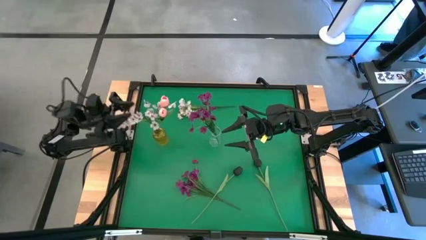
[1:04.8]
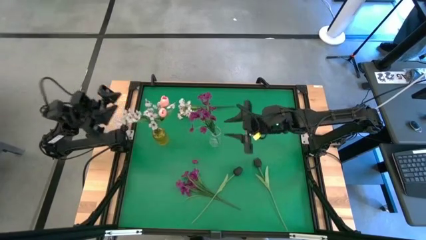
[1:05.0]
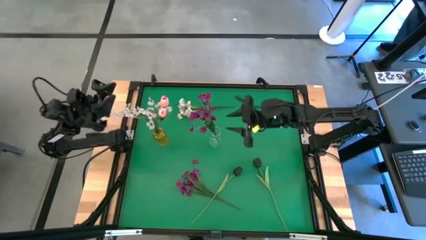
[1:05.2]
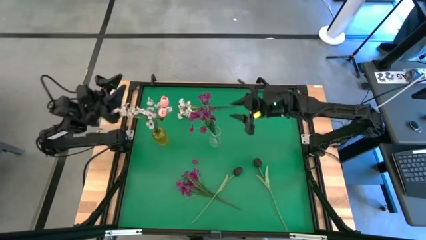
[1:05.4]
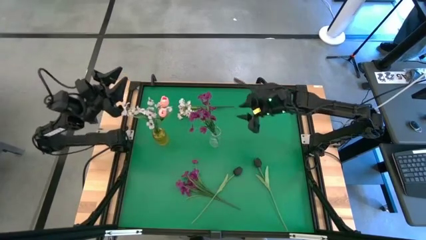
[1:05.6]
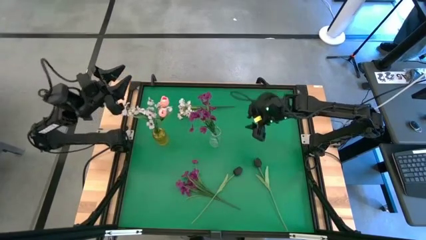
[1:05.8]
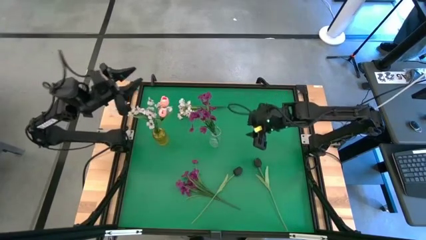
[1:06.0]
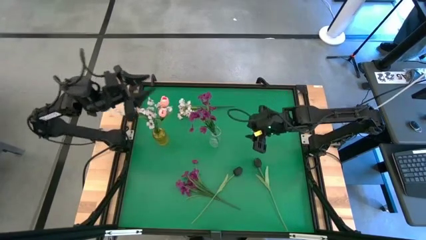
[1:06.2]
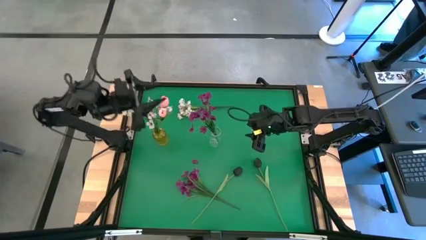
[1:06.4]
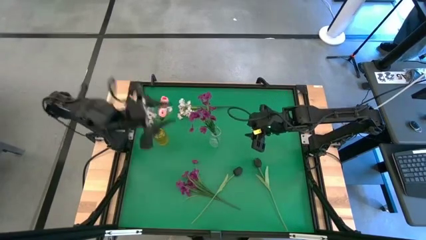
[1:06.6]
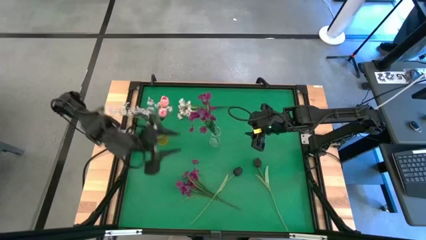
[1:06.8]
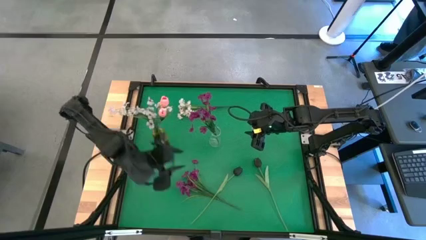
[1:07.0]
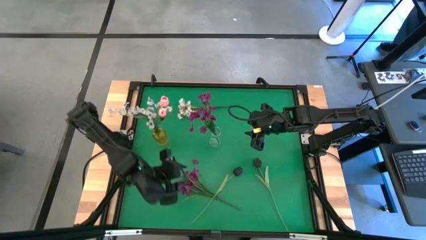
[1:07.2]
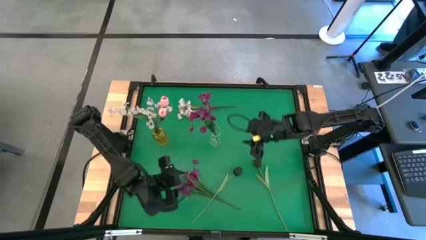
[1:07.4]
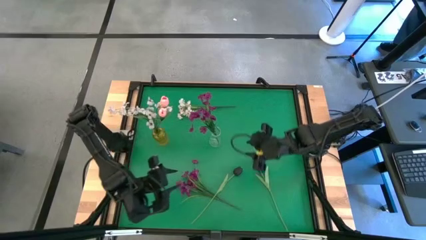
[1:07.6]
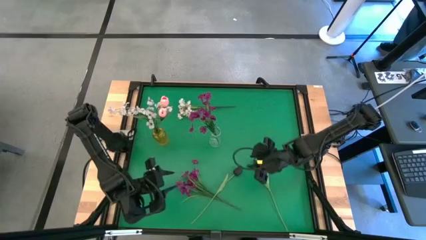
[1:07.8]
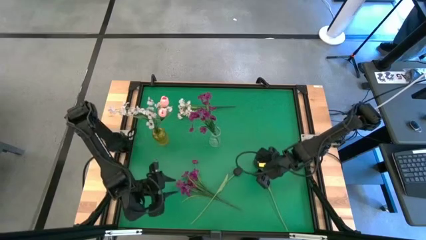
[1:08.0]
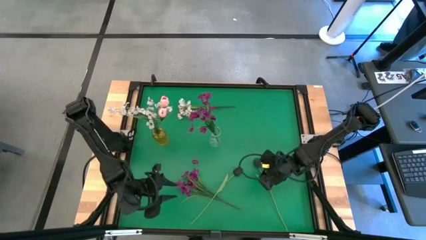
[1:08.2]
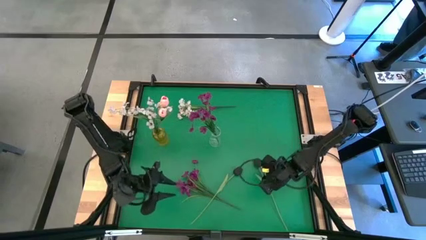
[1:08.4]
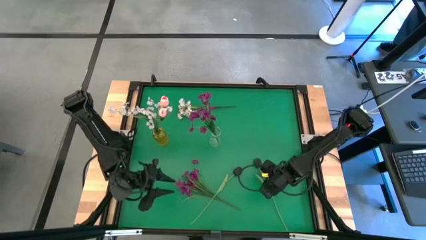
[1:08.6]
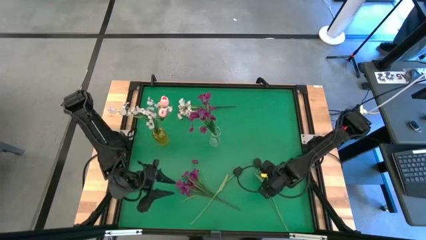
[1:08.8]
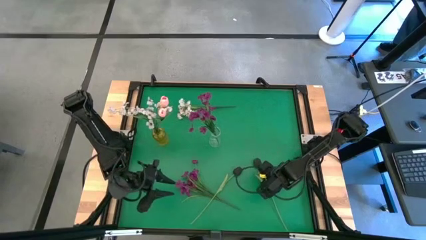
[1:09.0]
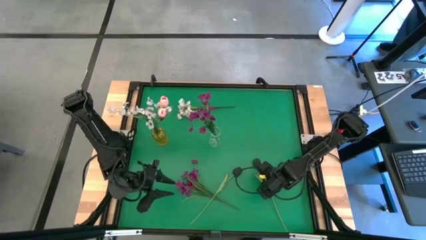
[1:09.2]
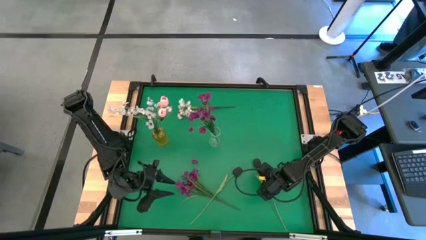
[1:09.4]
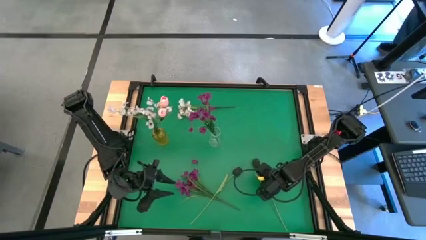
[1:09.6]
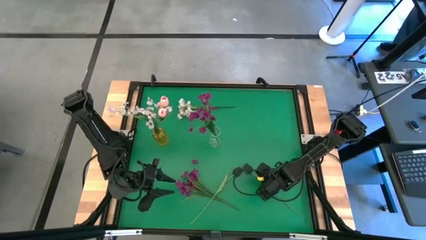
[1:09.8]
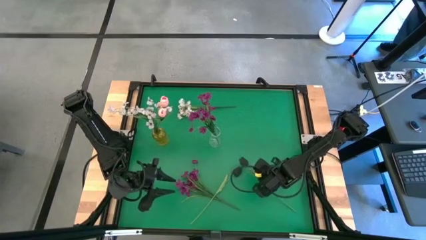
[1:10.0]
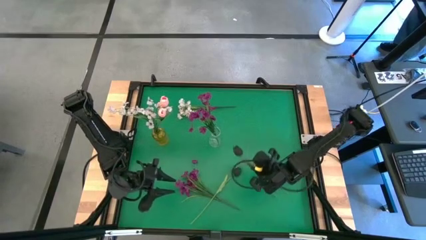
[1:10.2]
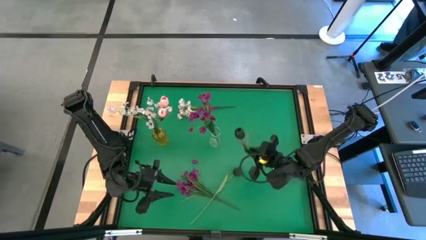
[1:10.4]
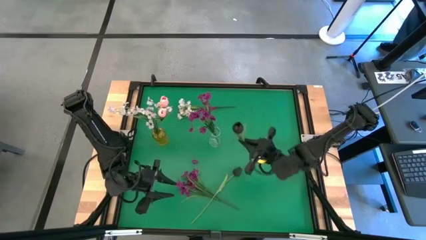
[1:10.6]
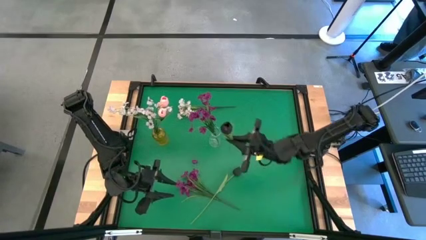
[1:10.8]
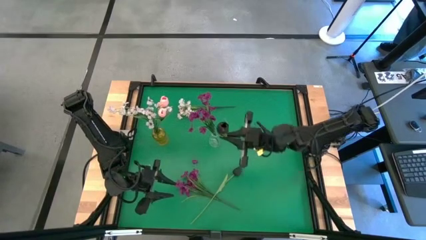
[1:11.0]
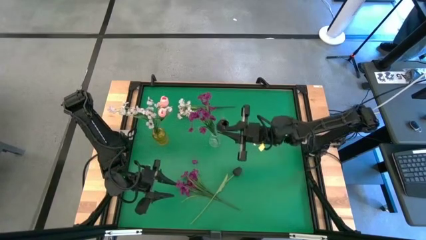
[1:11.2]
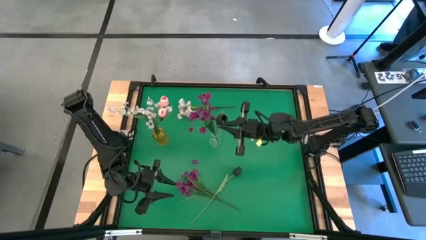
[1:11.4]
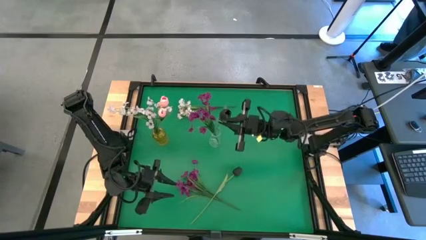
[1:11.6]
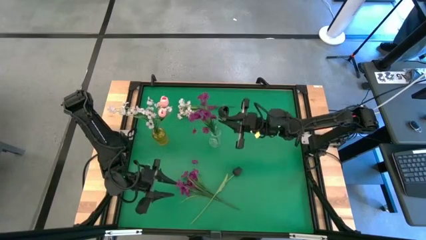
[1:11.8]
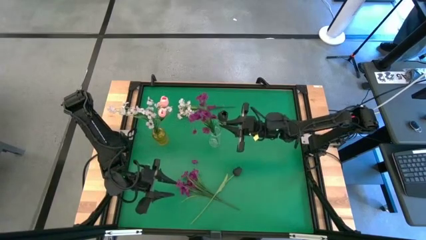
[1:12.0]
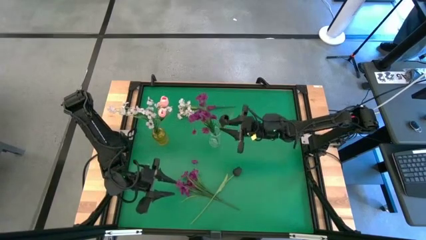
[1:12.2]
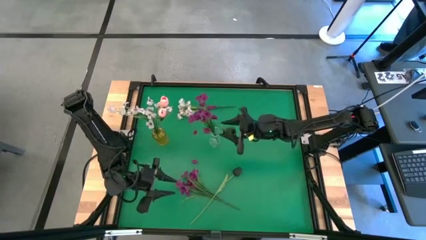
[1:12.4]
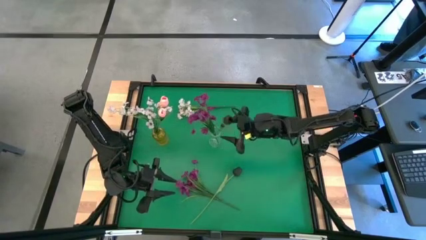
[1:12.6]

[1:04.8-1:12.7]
Task: Sort flowers into vase by color
Put the right black flower into the transparent vase

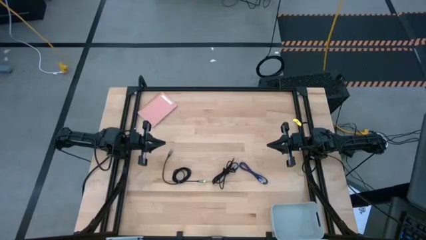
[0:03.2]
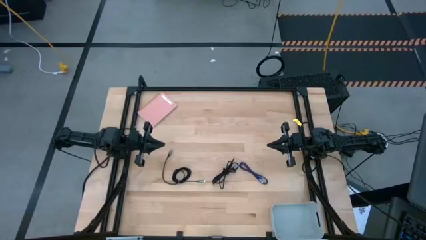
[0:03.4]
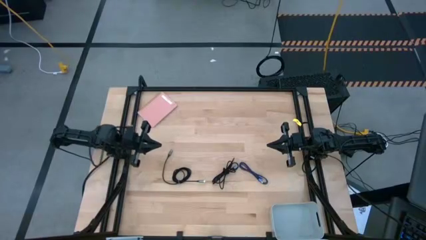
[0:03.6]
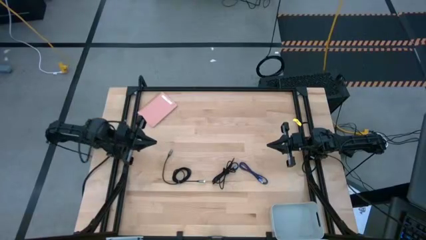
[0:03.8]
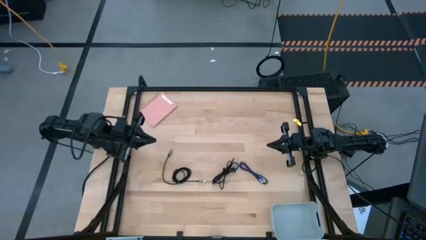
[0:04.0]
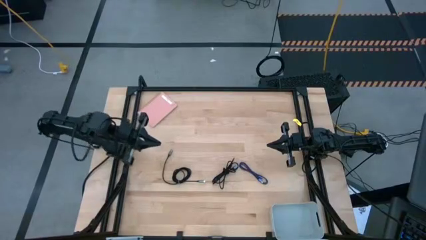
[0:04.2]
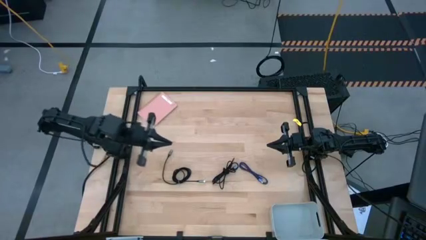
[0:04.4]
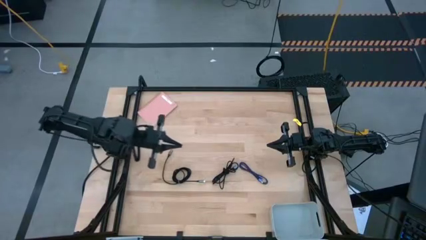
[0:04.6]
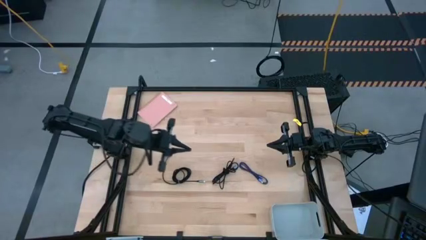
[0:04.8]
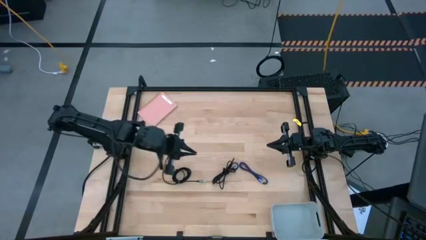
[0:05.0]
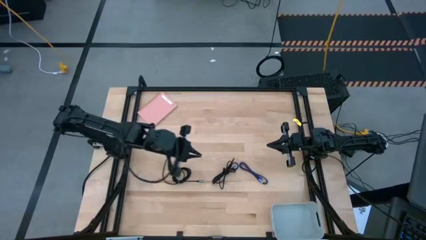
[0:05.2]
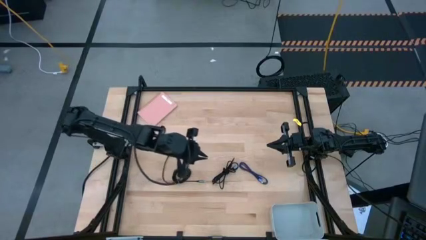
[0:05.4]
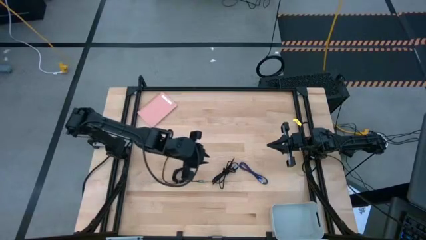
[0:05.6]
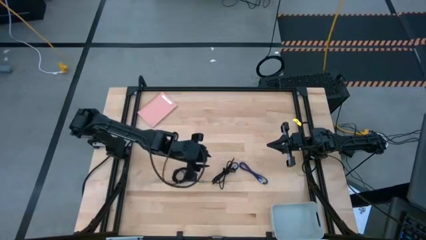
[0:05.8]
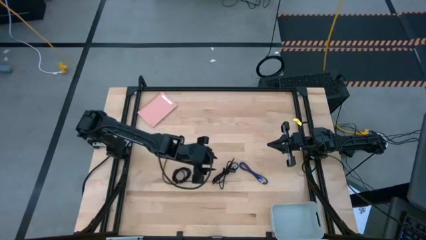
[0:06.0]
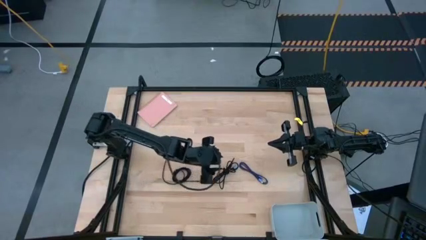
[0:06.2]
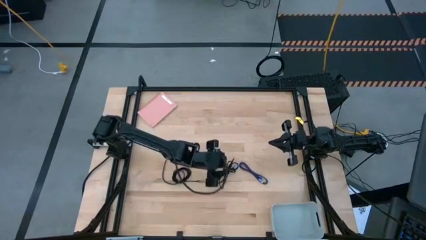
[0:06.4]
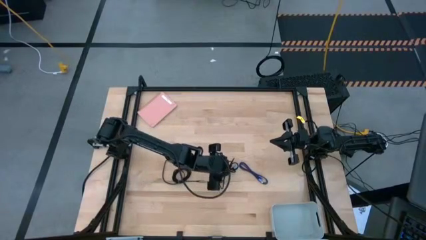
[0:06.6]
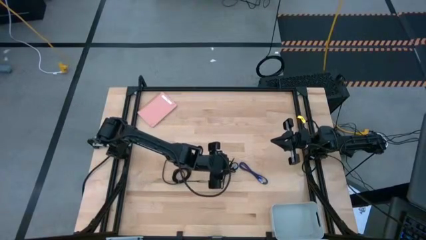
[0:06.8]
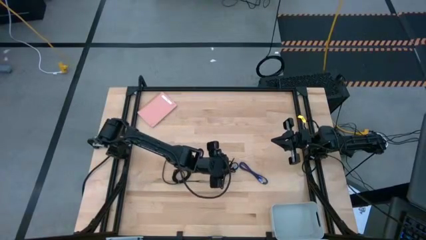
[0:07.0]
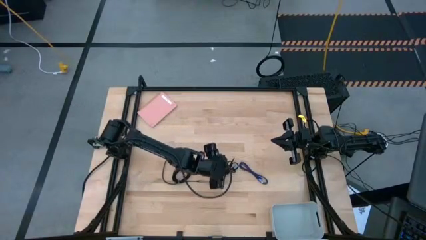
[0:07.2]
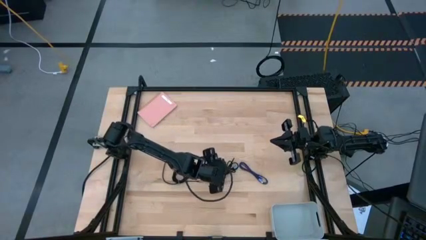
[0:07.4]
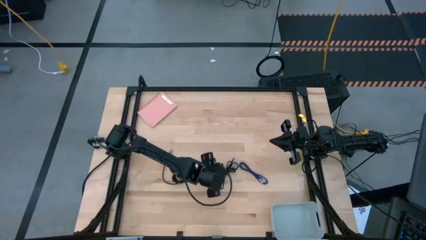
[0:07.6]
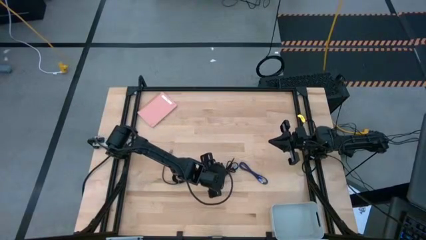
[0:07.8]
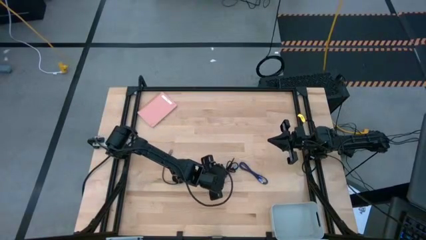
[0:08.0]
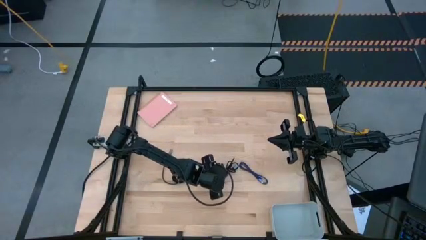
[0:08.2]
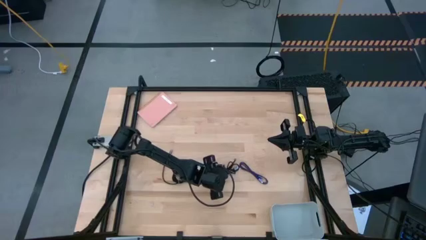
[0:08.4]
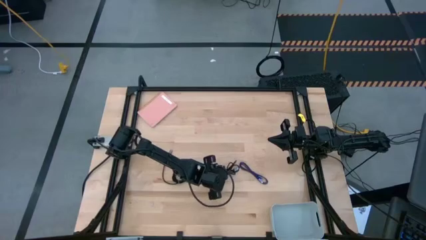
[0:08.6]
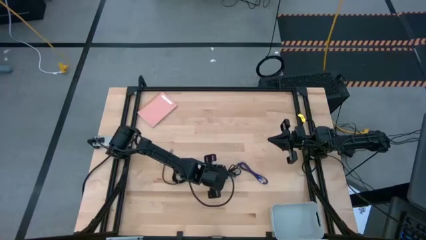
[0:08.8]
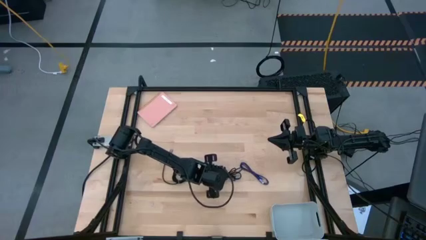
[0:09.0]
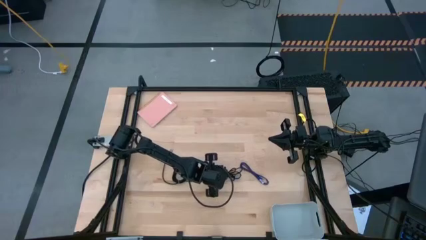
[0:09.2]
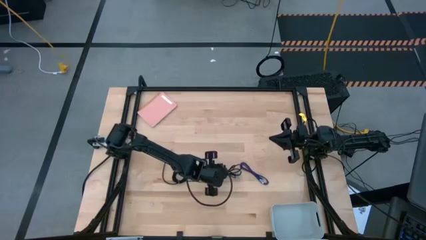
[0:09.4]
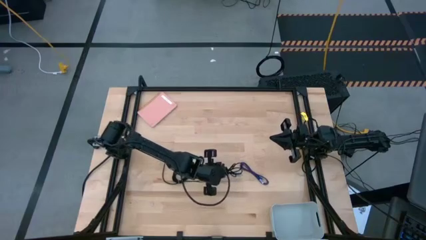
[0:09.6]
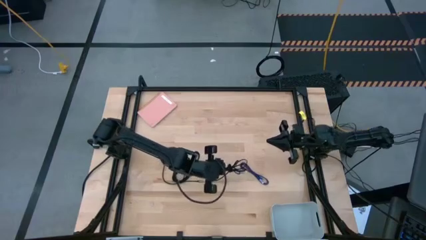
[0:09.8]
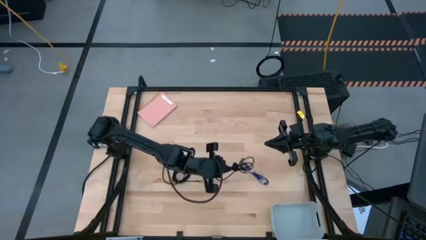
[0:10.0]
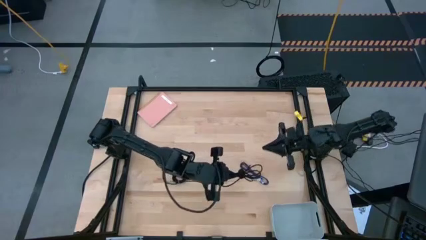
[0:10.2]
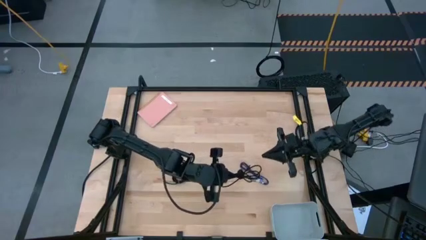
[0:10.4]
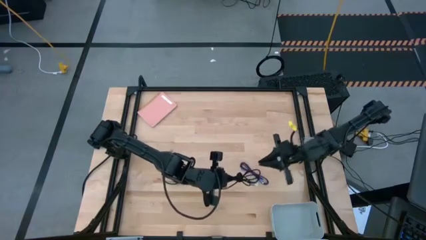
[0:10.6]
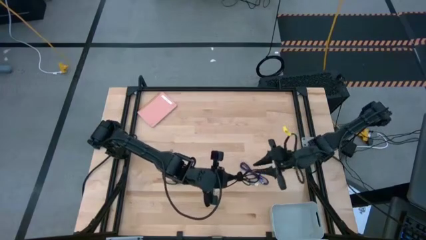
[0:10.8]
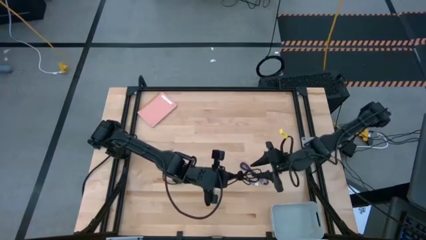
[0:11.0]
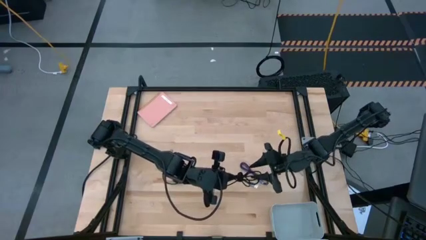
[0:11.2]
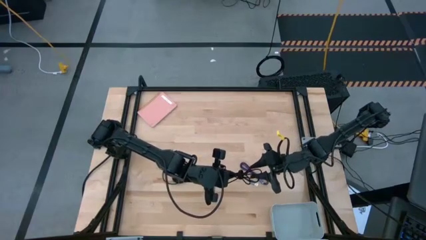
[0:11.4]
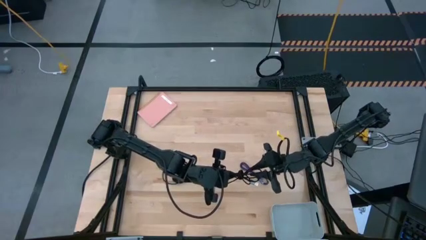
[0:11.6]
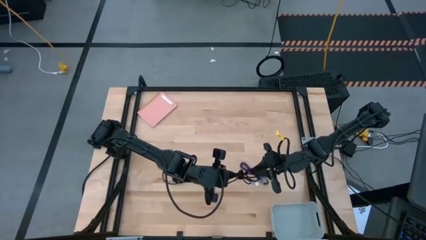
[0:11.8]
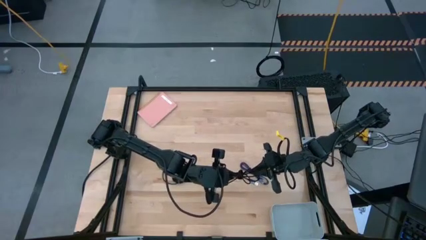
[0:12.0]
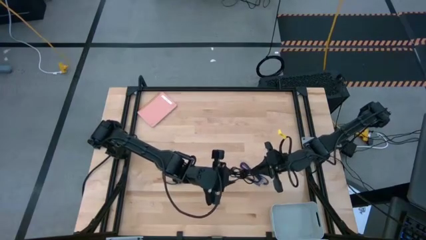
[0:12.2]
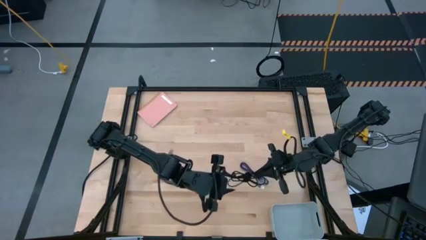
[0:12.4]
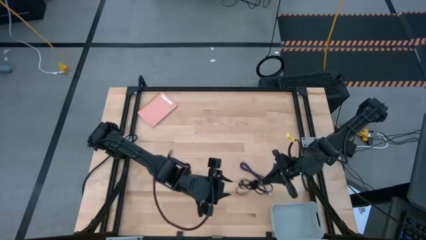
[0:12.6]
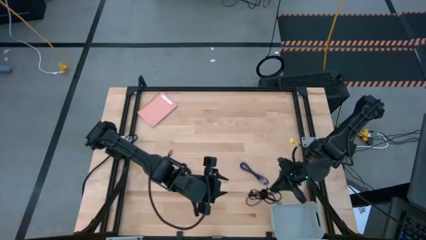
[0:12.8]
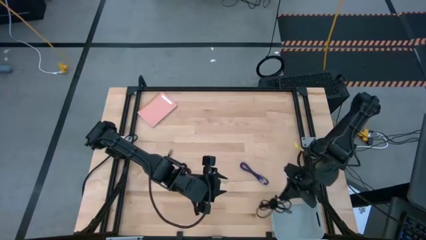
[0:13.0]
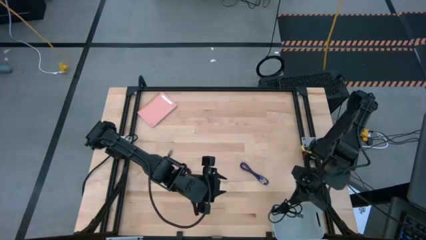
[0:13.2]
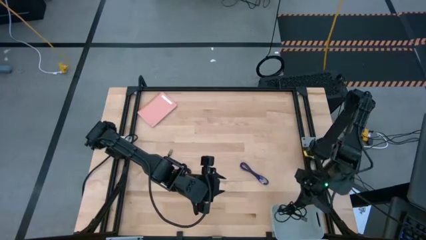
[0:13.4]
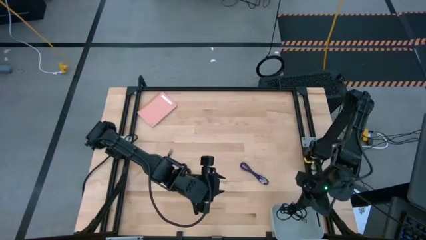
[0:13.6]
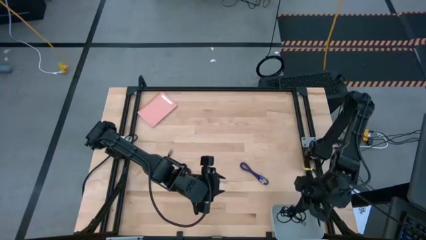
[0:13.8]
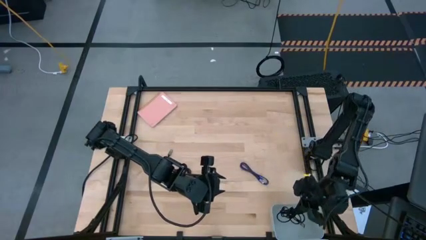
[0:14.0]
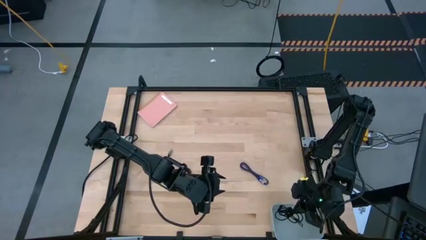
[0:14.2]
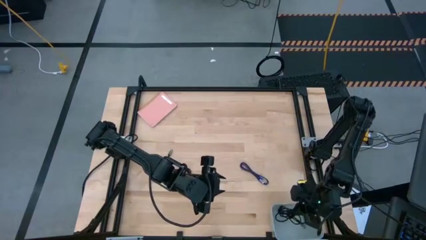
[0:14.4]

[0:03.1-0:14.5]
Task: Pick and place USB-C Cables
Put the right black charger cable into the bin
